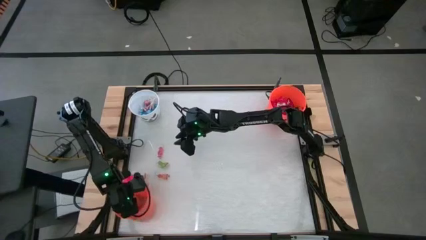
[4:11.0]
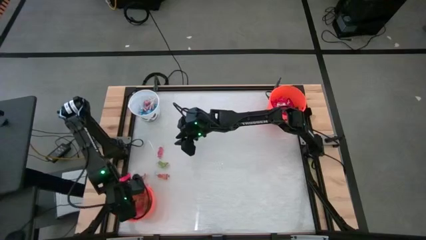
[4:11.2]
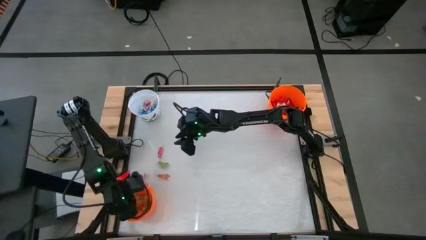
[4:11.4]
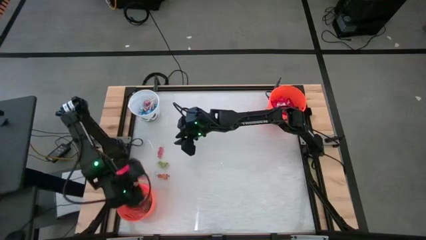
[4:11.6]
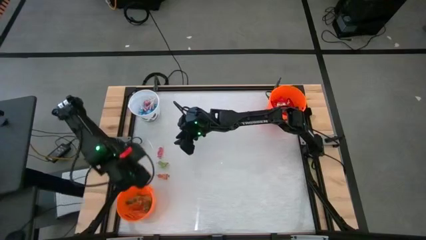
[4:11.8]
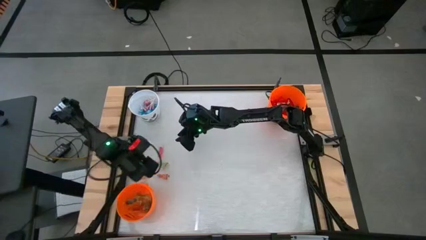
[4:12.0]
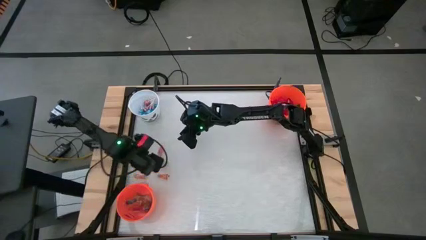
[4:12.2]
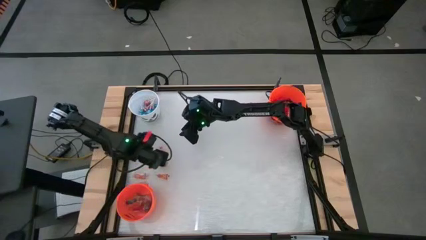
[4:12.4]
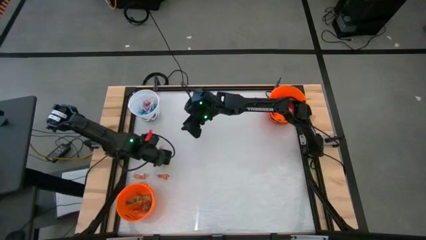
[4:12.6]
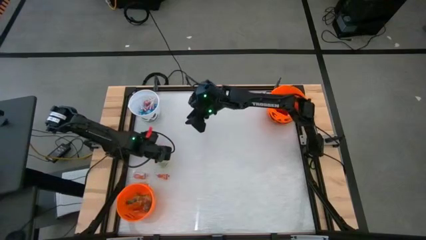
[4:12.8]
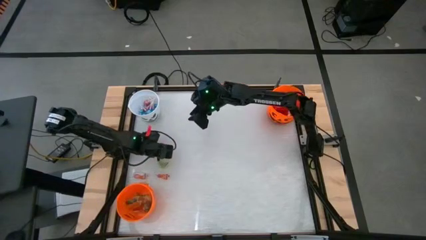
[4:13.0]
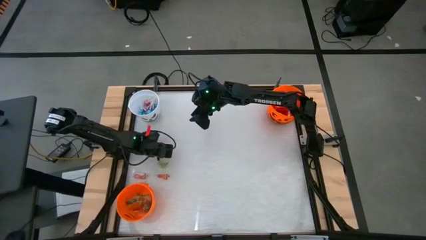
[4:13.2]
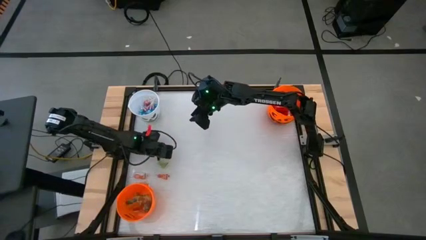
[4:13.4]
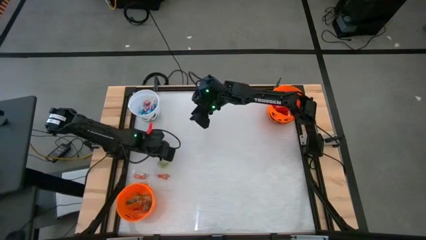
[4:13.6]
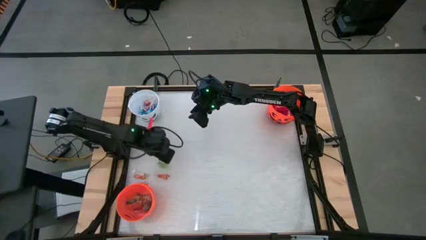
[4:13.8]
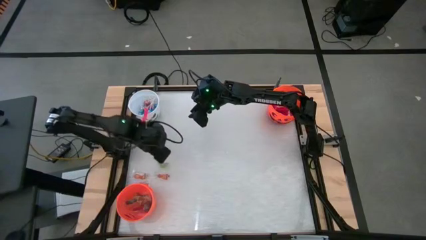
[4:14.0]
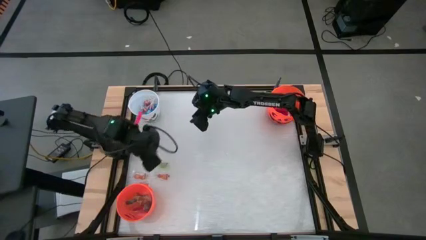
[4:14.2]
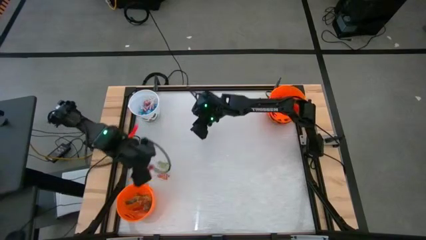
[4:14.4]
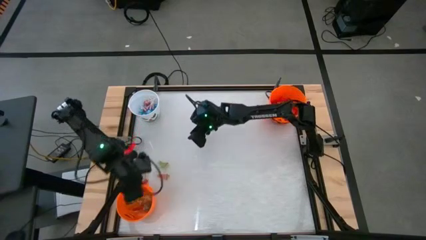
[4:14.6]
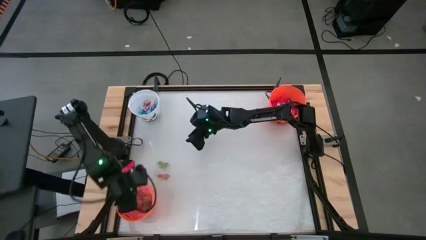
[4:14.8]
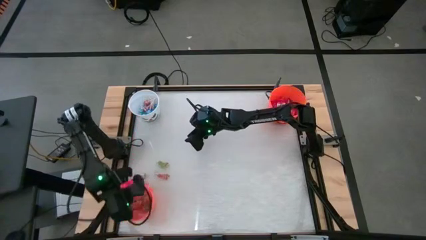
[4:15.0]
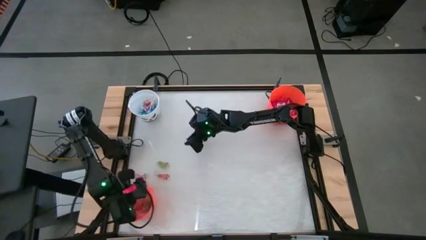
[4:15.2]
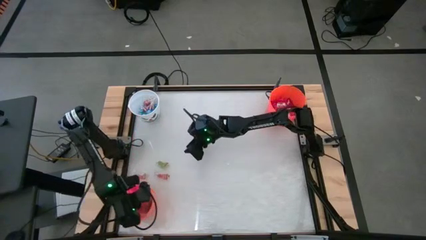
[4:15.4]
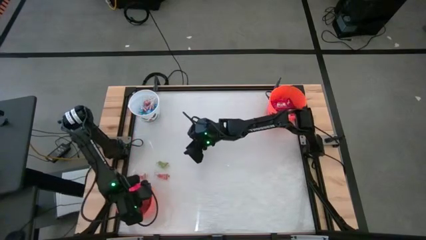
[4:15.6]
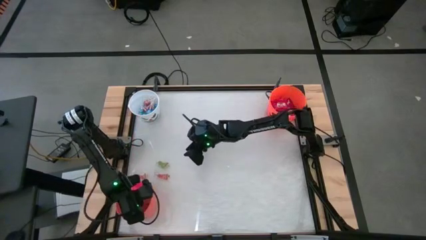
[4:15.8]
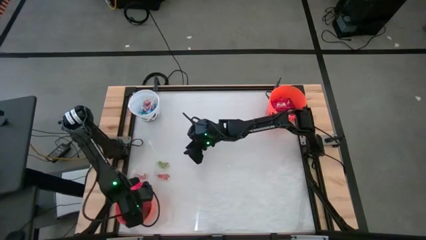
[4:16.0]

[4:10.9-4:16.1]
Task: Sort candy by brand, put in halloween buckets
Put the orange gummy into the bottom orange bucket

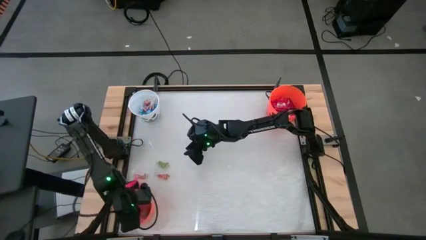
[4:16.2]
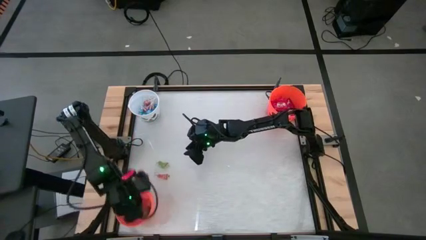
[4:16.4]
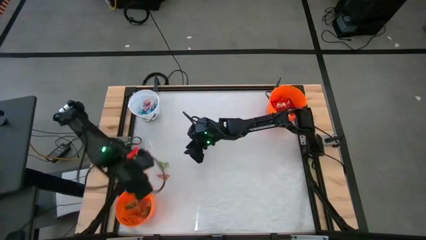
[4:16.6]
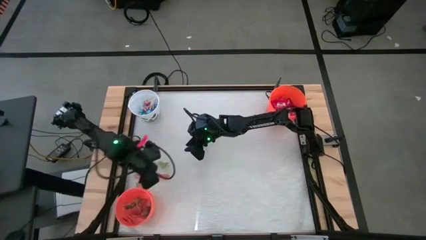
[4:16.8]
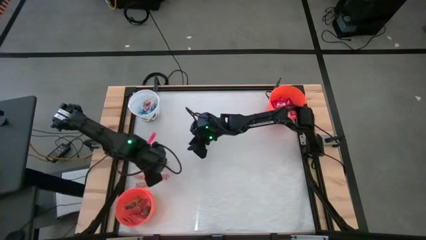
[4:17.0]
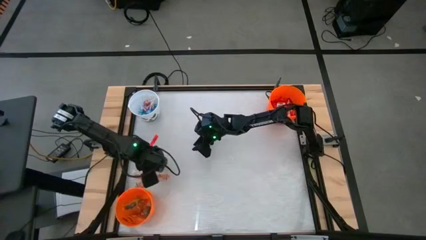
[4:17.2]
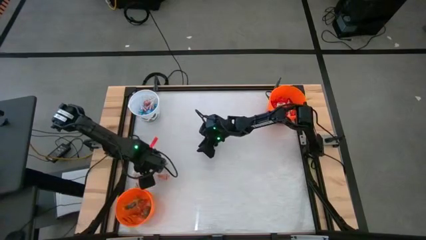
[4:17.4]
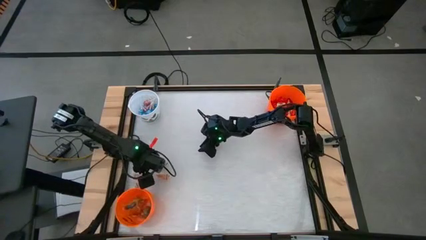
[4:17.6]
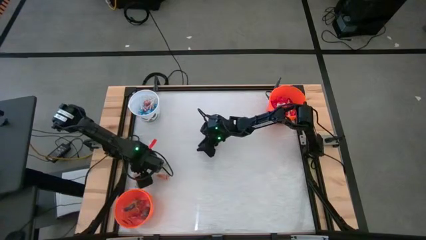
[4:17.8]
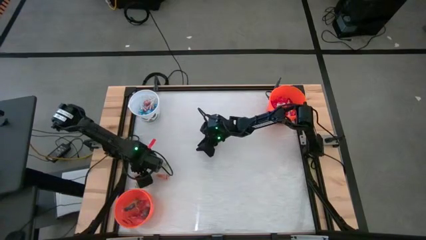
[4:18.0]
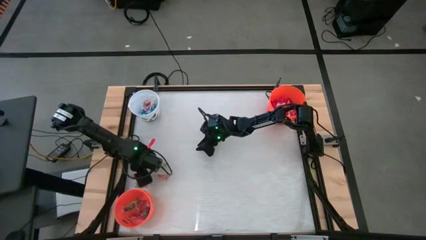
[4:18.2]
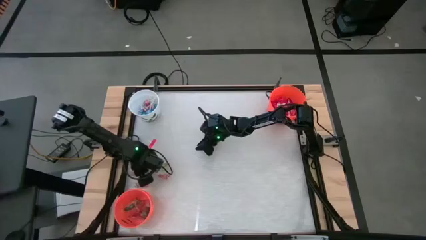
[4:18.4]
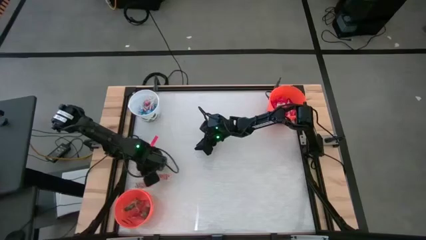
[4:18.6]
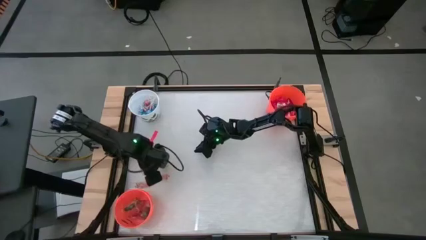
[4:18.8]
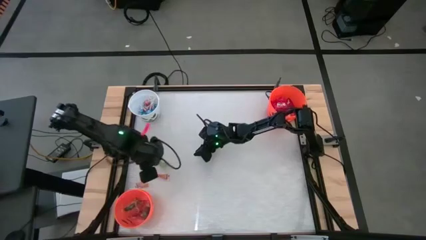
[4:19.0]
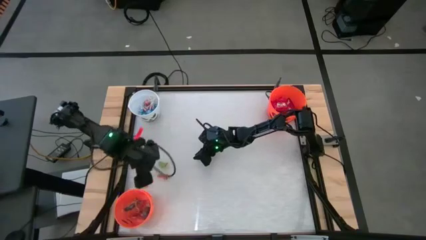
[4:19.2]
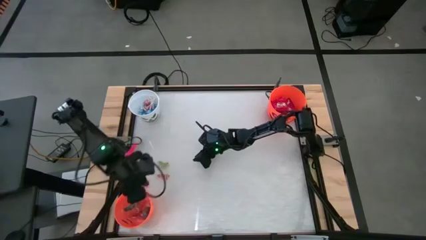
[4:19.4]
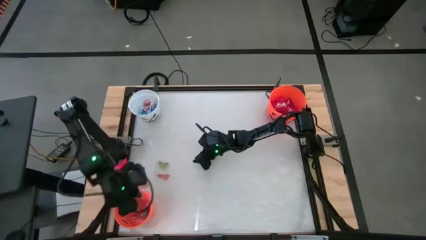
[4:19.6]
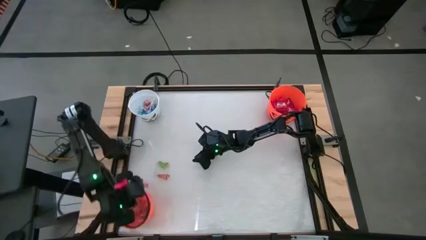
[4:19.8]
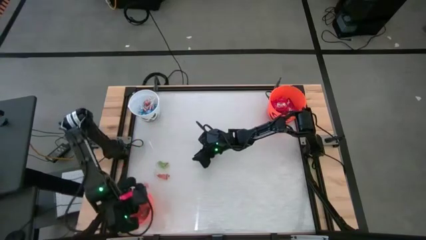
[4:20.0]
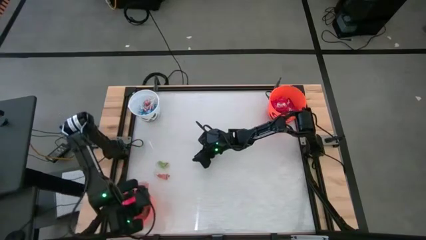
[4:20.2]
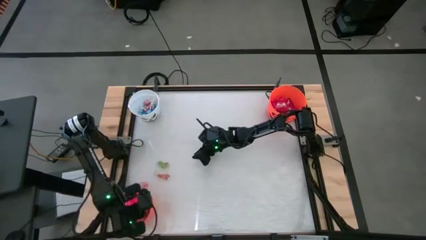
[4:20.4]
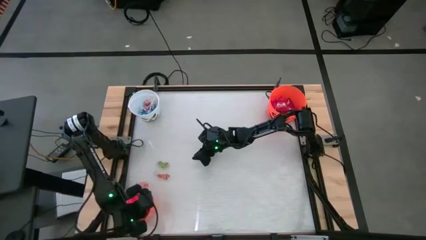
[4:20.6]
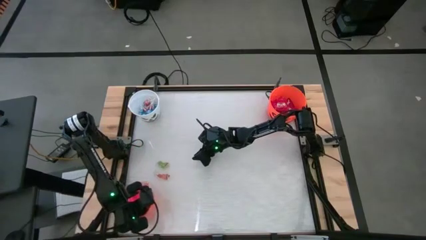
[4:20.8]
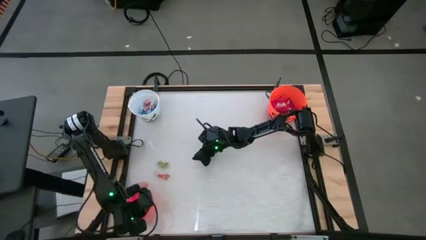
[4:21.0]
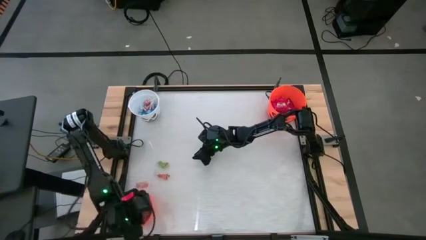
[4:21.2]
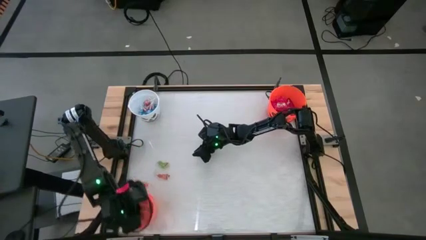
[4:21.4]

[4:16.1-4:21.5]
Put the orange gummy into the bottom orange bucket

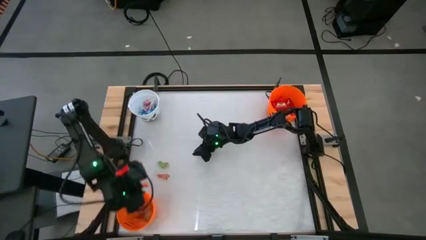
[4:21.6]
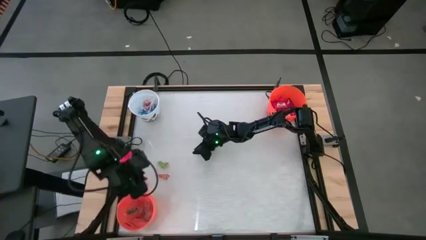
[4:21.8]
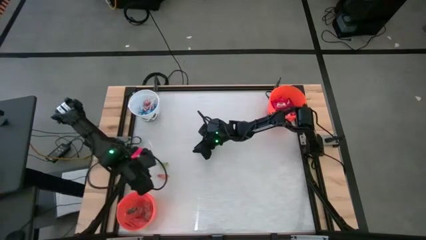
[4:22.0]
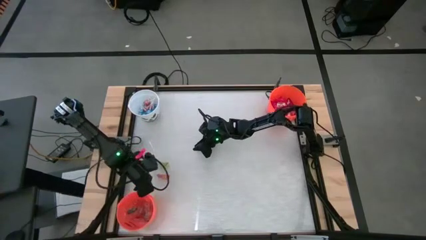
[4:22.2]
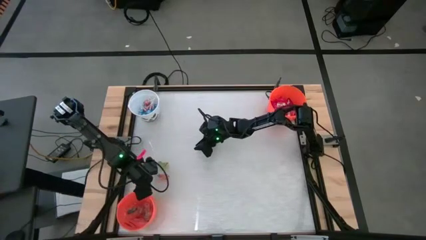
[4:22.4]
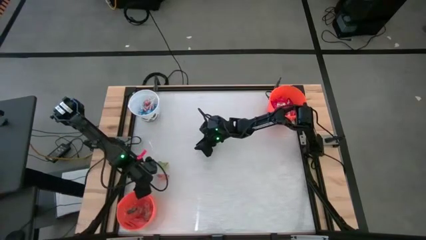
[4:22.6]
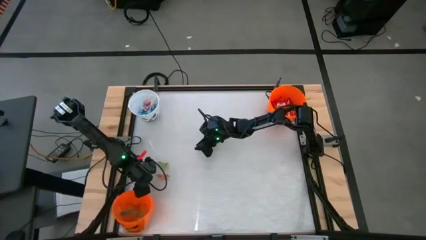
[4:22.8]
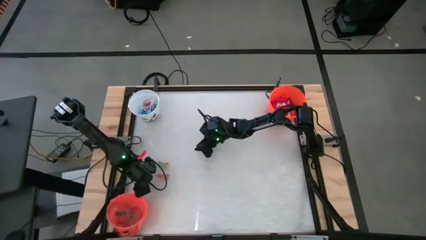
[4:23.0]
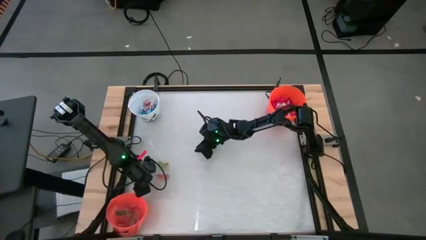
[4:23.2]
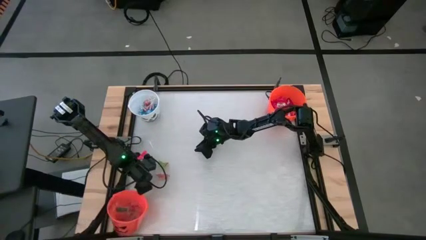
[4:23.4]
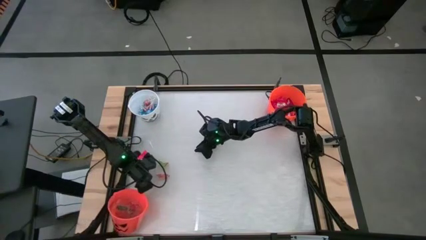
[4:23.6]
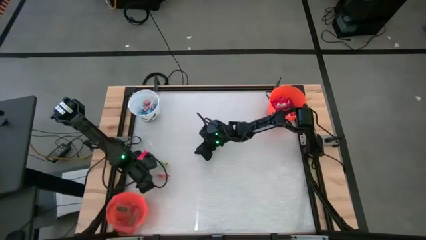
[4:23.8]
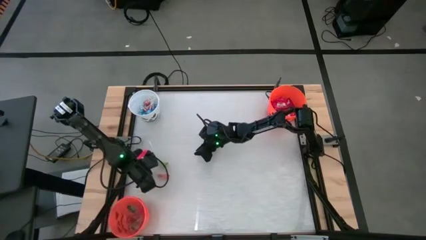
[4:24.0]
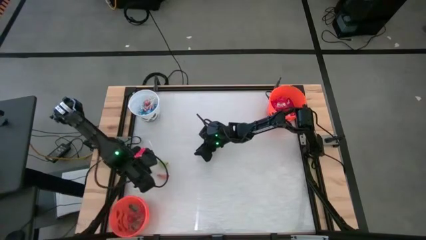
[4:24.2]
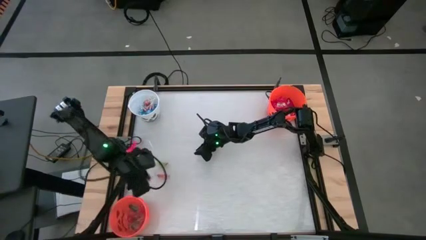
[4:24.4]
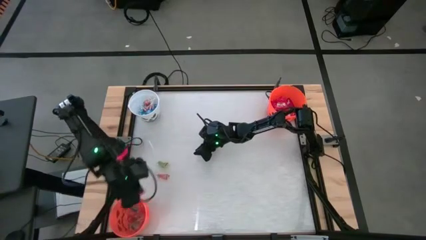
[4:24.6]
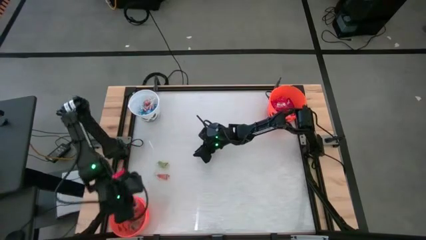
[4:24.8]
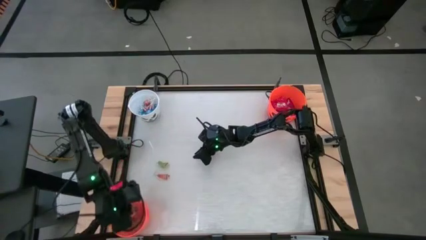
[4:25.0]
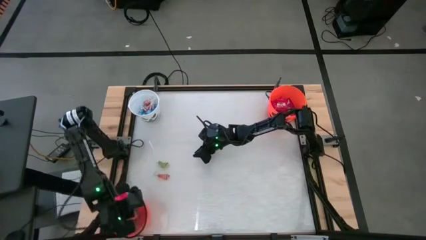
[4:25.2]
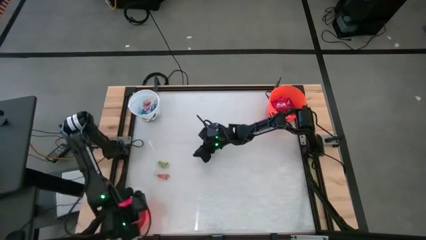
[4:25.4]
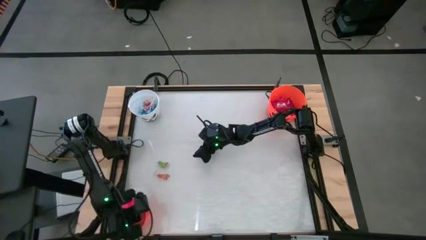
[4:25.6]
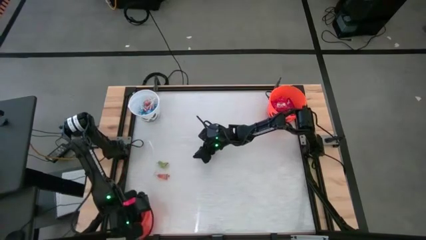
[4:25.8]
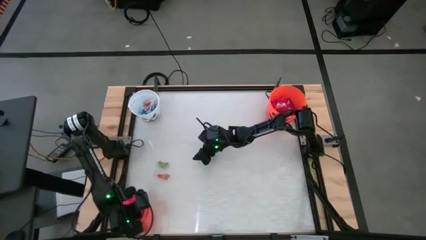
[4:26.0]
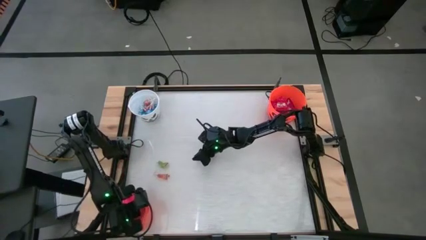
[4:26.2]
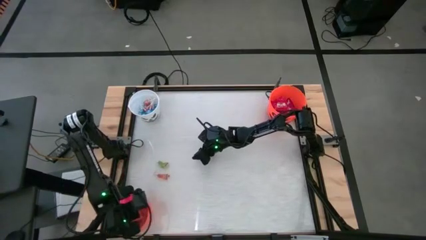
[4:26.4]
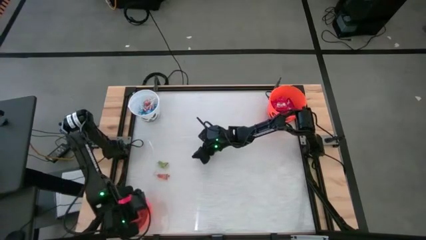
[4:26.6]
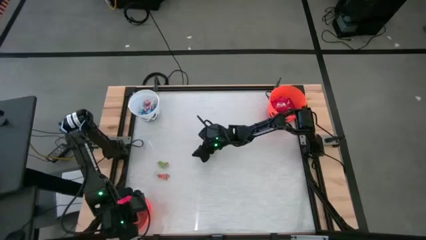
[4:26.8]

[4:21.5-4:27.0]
Put the orange gummy into the bottom orange bucket
